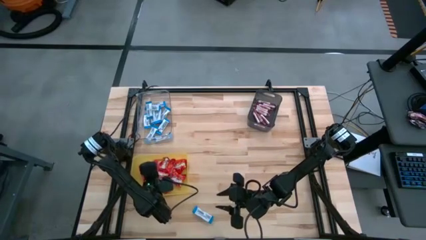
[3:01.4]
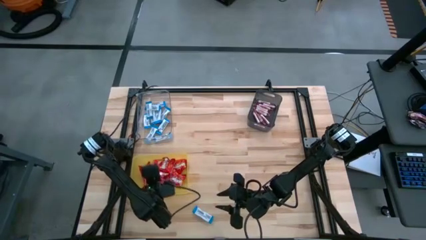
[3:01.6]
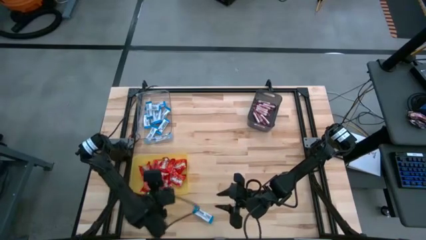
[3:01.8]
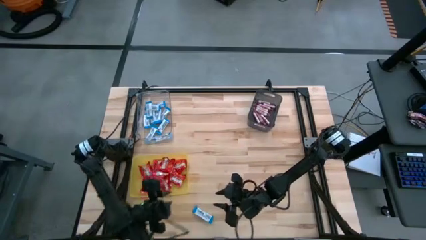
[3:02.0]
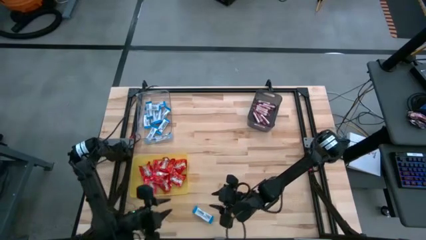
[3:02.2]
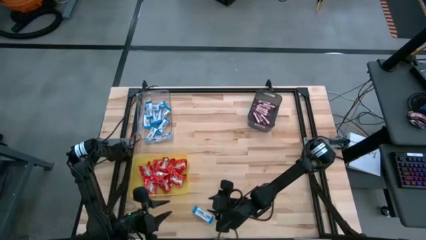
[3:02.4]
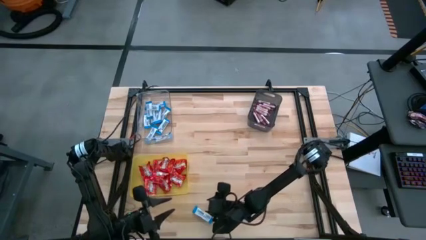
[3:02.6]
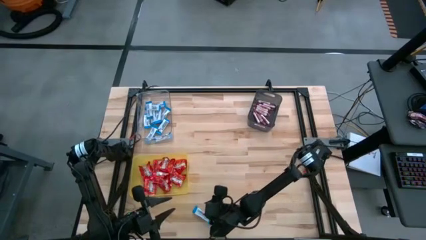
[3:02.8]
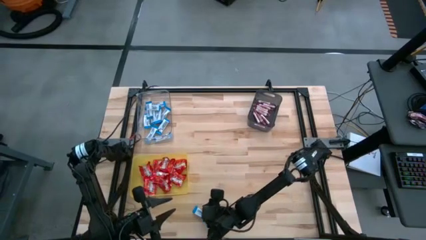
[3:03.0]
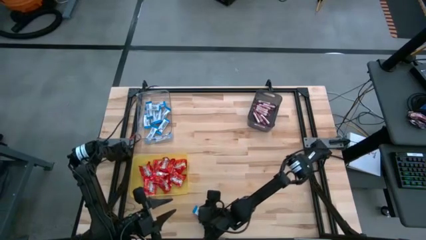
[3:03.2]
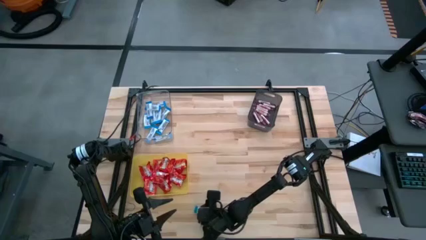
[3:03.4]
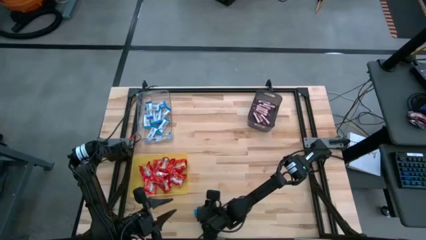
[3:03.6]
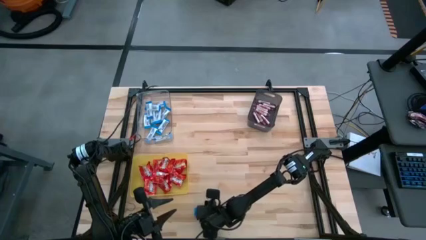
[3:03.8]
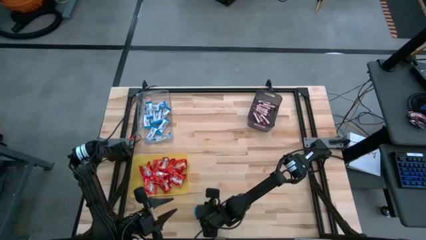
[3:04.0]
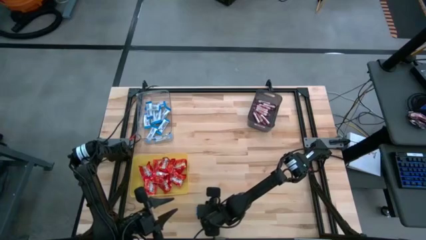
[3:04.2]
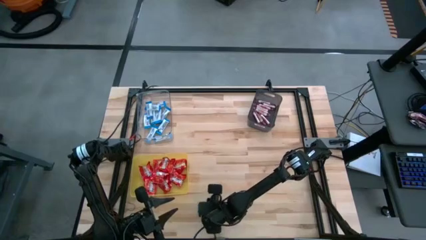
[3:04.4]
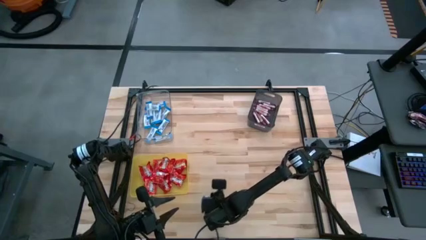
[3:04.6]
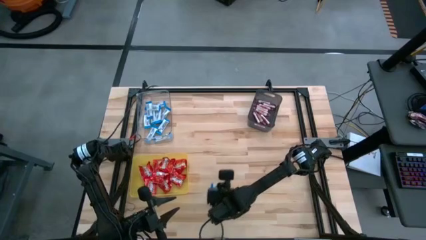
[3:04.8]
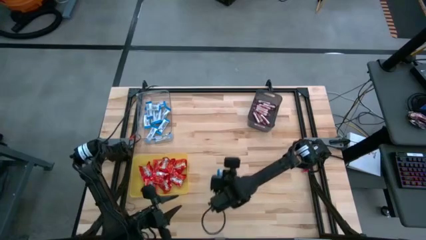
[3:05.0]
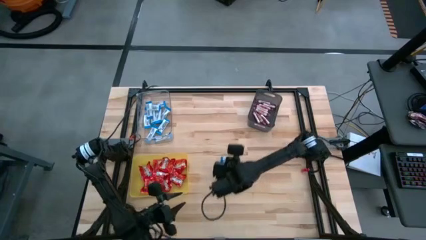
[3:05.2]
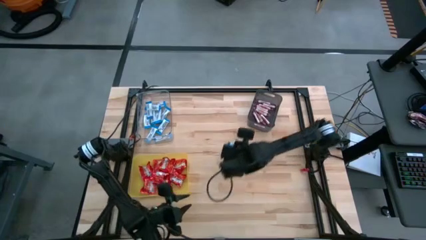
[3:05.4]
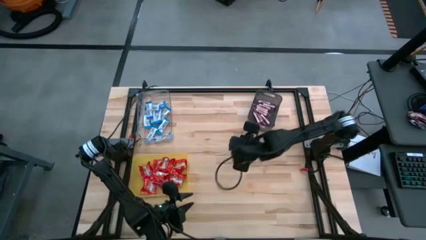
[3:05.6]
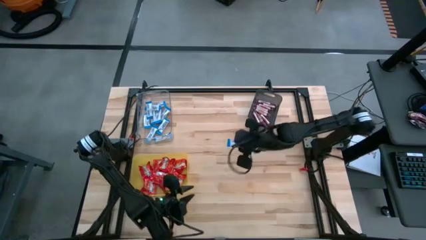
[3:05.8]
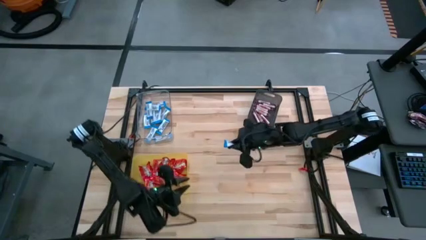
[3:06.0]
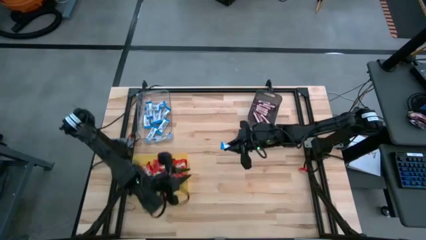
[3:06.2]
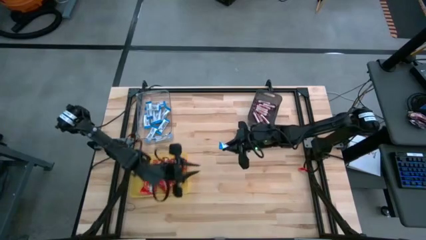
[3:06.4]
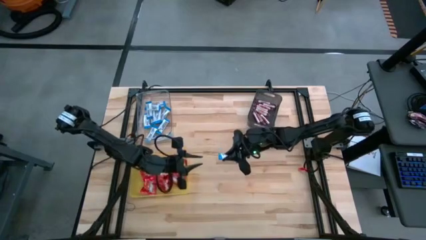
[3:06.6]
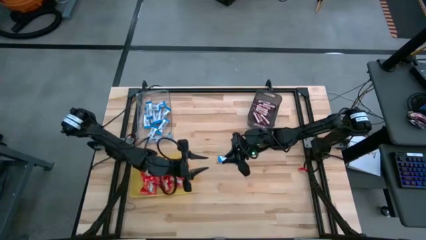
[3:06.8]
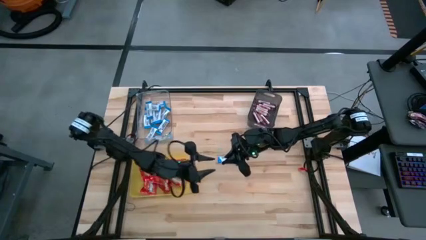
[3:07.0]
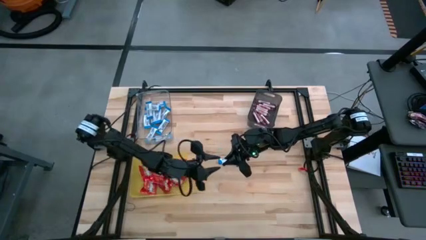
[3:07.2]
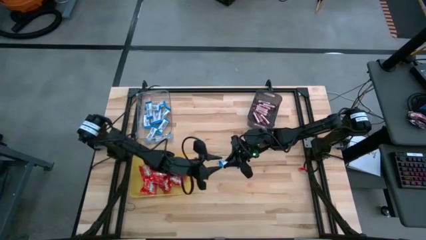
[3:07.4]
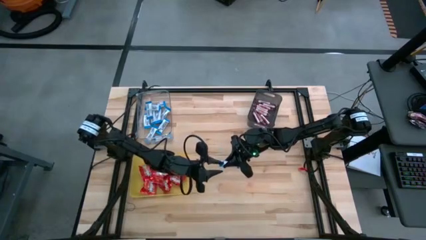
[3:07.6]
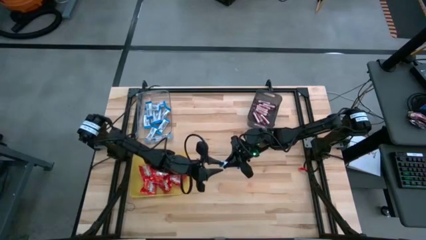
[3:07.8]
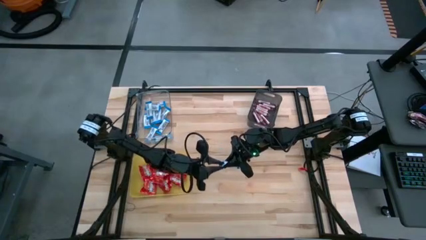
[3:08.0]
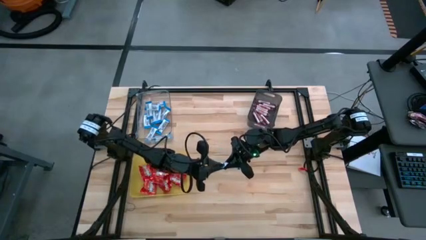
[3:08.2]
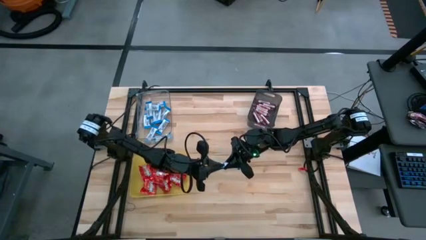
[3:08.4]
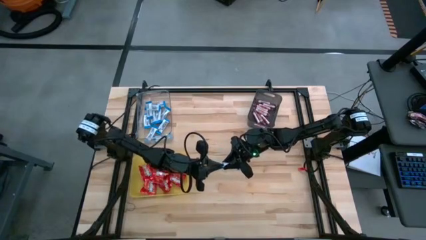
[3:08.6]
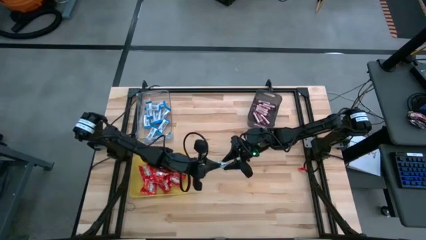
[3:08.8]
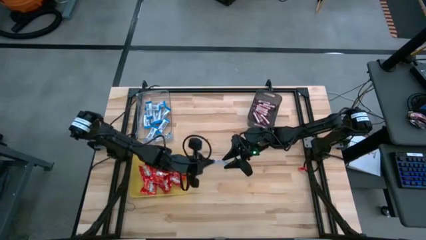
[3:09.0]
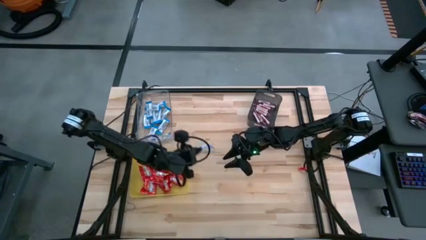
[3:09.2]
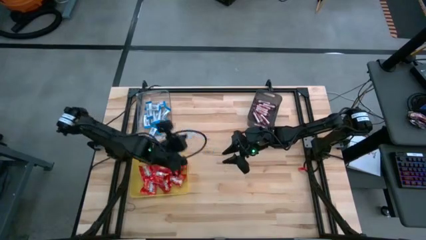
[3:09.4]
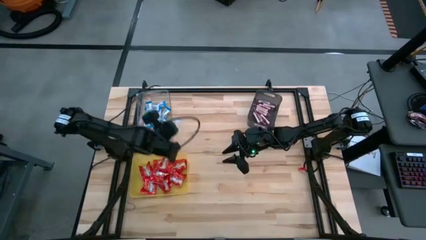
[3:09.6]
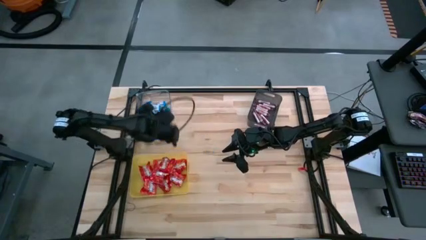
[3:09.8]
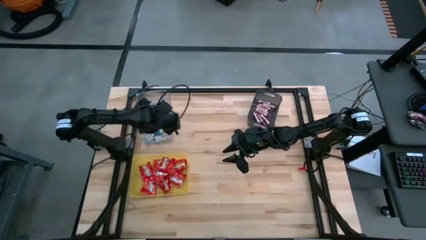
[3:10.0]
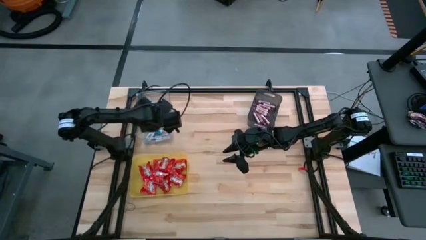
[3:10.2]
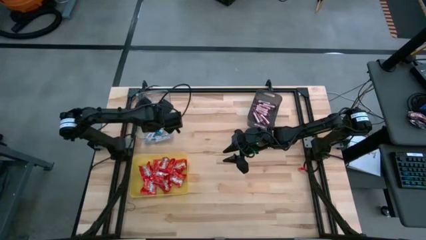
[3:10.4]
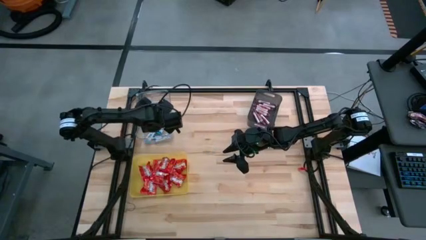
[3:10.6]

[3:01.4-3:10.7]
Task: Sort candy
Put the blue chocolate into the transparent bin

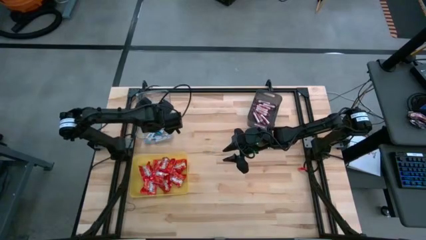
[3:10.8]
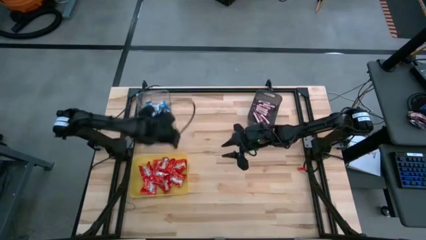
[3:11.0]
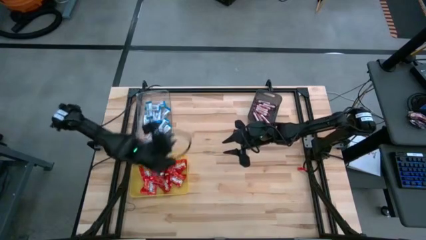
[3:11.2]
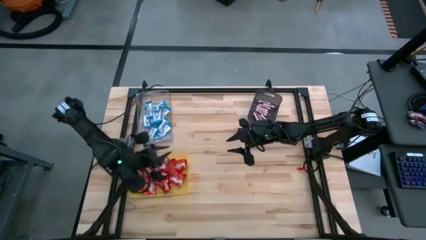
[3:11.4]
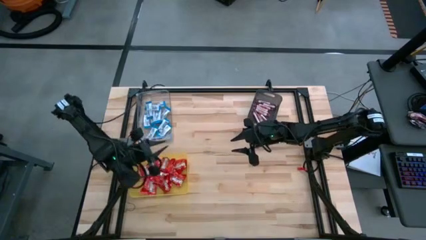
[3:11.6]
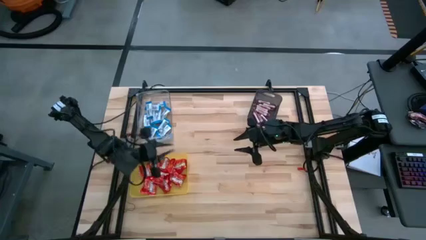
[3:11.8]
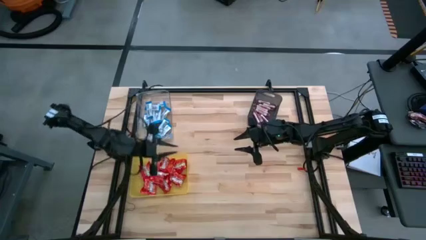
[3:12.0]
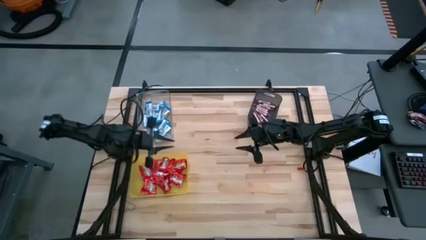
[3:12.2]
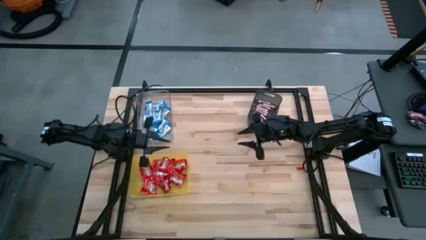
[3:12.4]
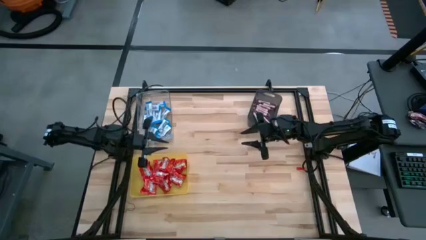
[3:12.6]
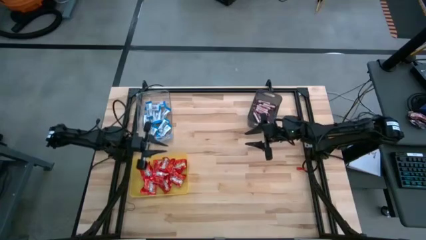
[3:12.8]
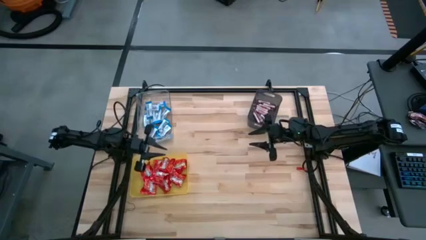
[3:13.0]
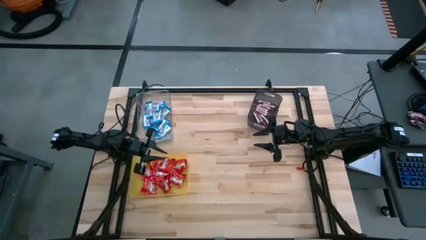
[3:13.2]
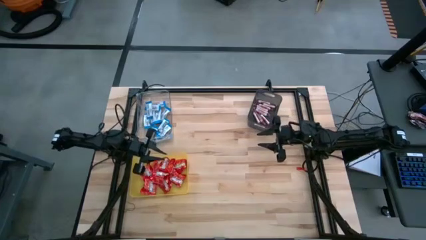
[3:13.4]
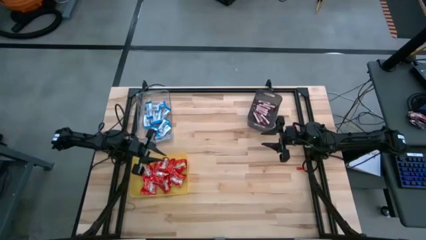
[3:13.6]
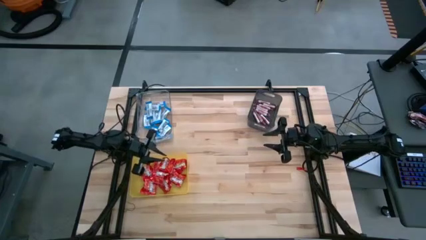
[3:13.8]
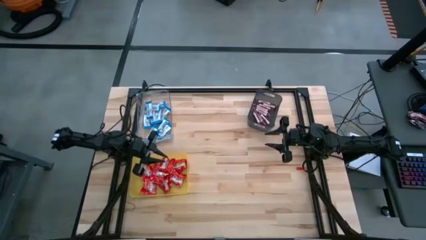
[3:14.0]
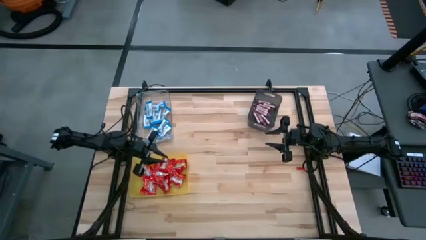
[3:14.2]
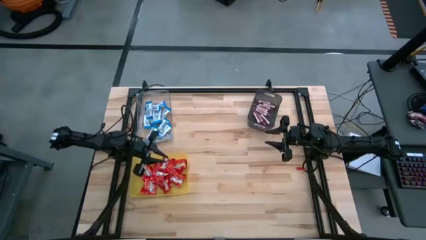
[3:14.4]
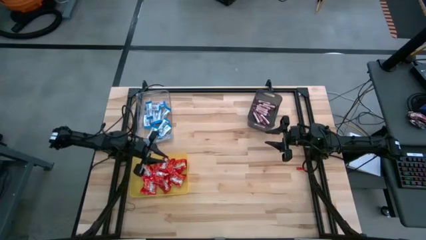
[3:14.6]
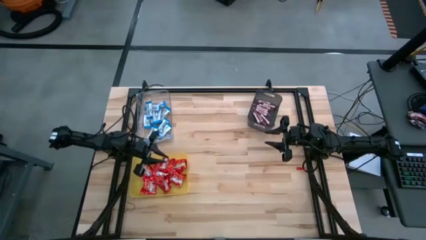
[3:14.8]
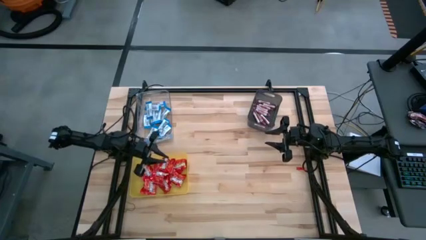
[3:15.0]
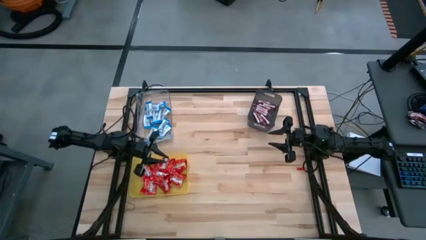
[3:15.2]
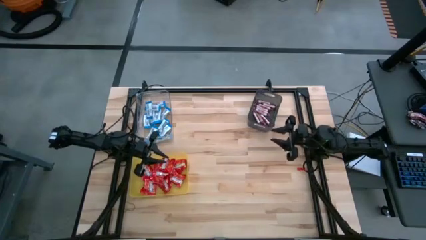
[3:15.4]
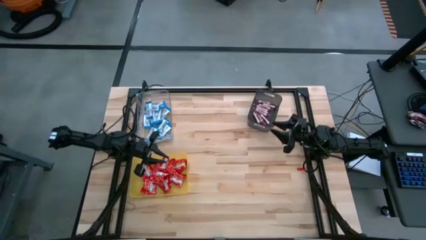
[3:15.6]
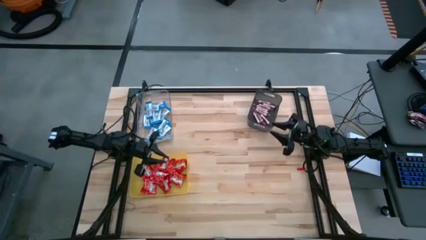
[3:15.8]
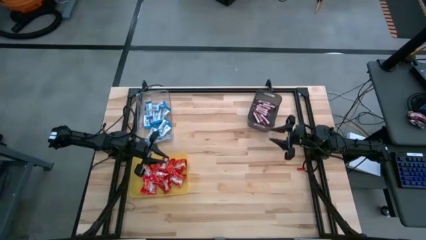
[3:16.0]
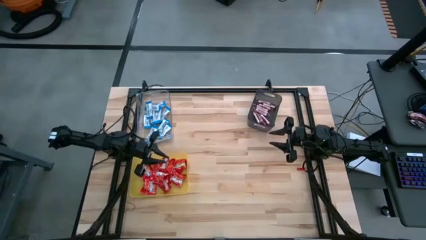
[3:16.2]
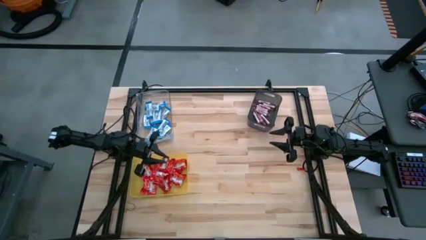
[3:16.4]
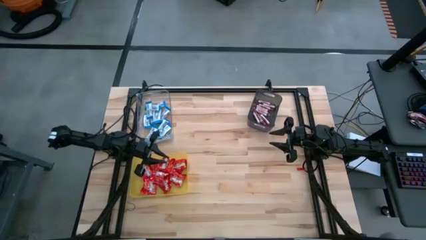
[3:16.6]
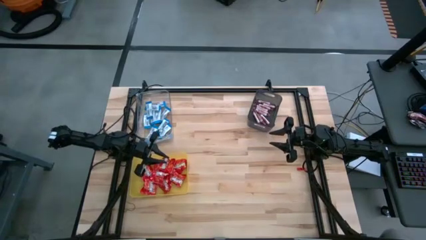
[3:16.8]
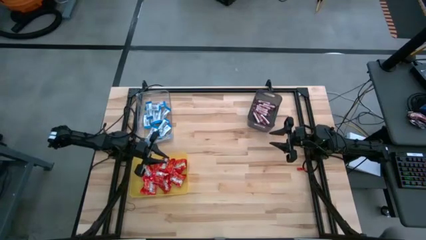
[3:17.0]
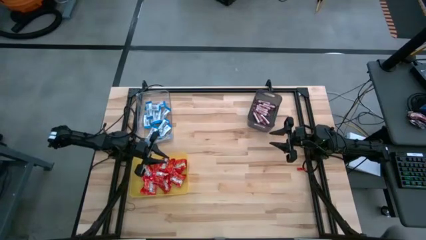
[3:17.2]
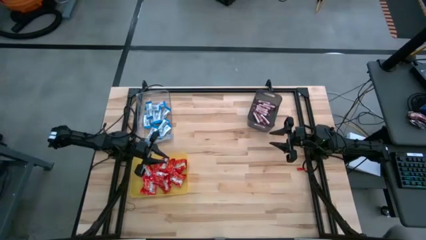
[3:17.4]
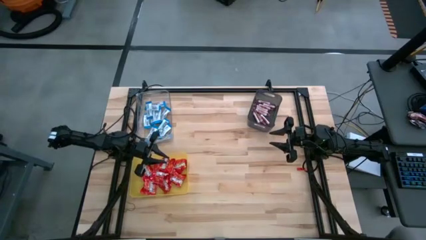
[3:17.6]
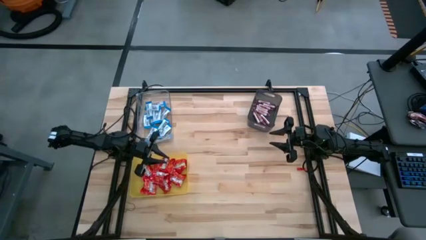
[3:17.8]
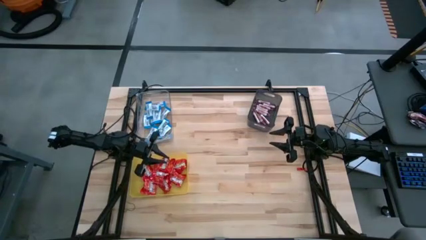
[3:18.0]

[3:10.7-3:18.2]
Return to Home Position

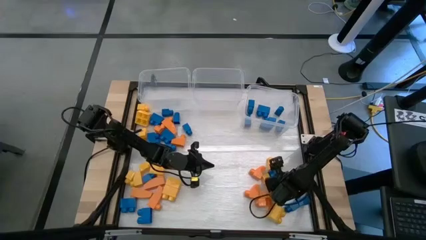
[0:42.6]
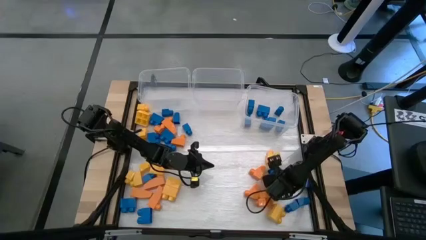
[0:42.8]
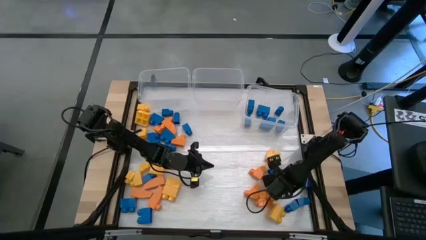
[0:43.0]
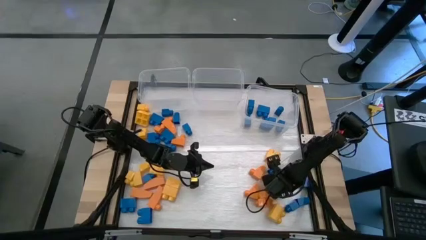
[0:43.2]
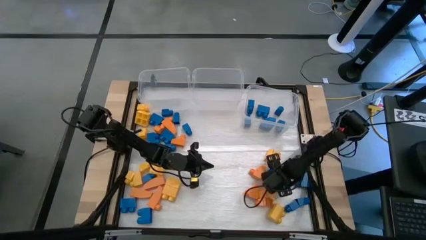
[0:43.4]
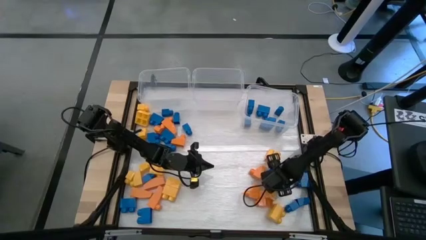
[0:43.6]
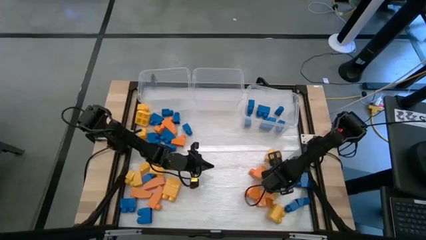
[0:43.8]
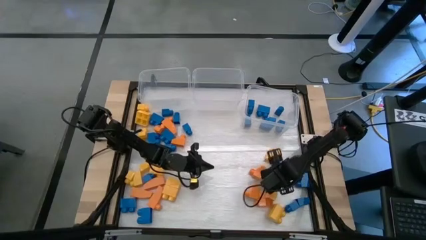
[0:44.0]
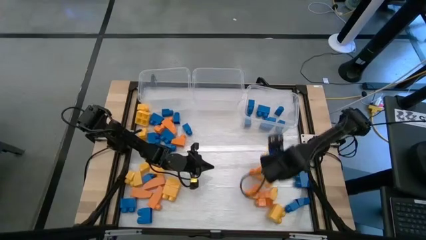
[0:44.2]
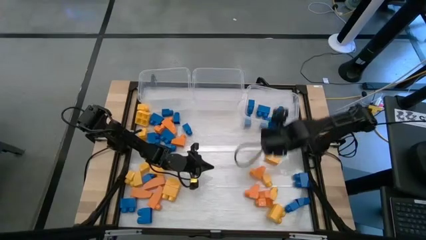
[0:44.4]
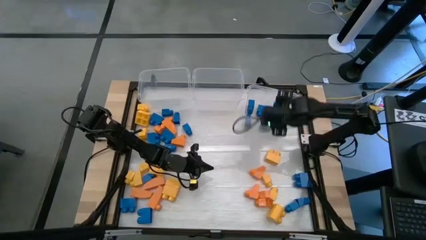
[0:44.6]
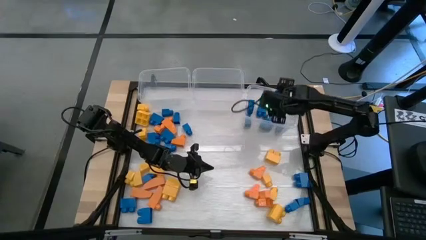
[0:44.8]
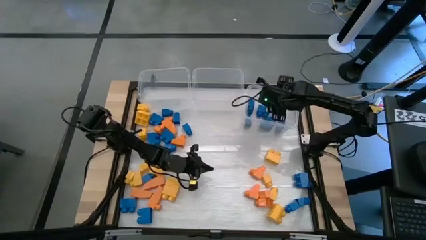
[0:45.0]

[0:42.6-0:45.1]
Task: Sort blocks
Put the blue game piece into the right transparent bin
